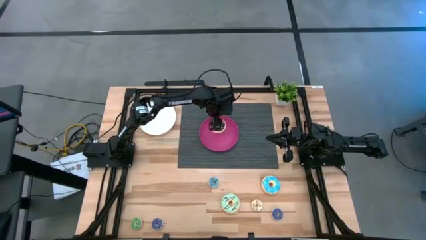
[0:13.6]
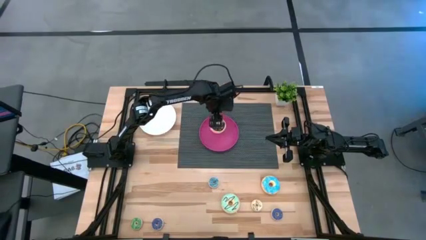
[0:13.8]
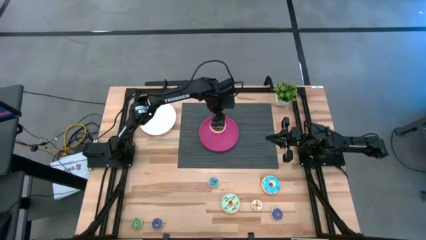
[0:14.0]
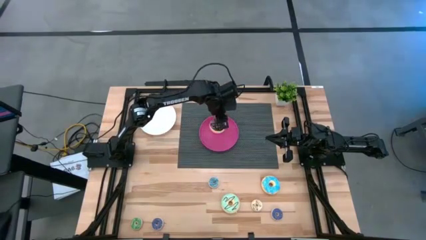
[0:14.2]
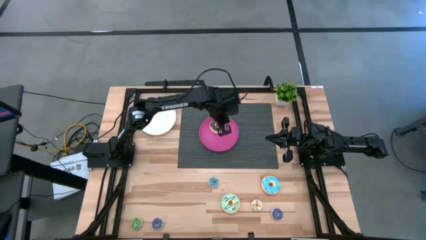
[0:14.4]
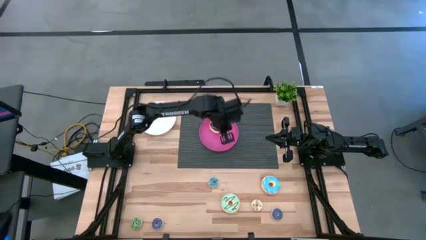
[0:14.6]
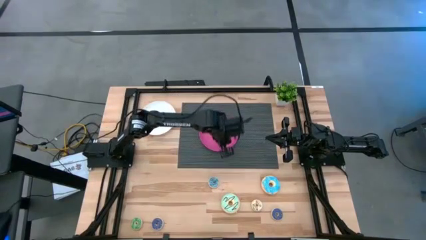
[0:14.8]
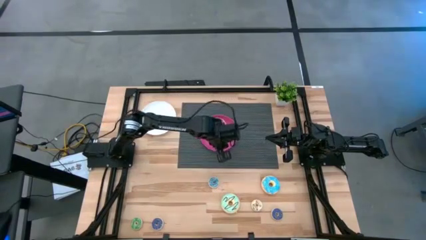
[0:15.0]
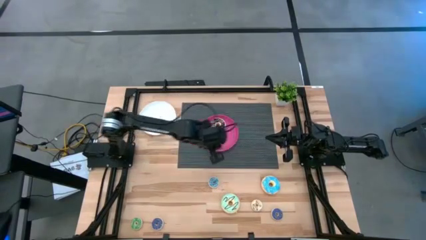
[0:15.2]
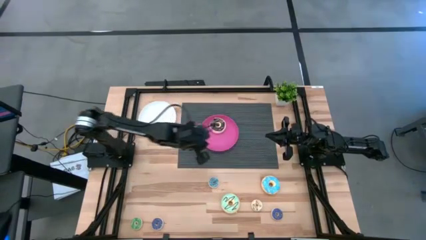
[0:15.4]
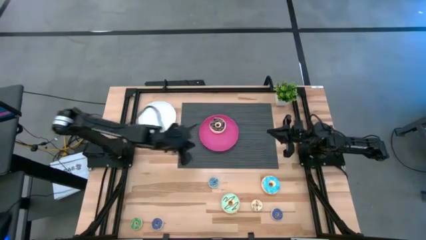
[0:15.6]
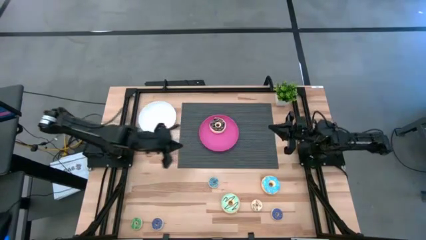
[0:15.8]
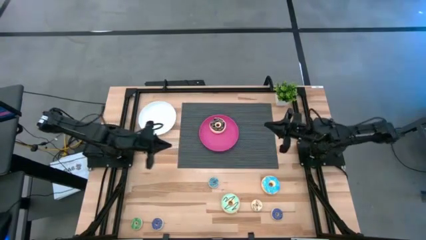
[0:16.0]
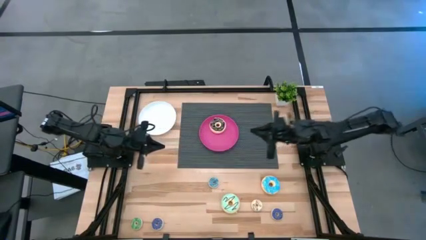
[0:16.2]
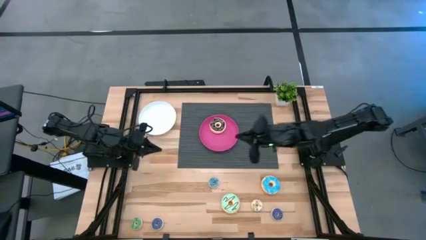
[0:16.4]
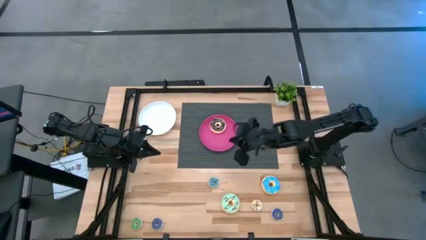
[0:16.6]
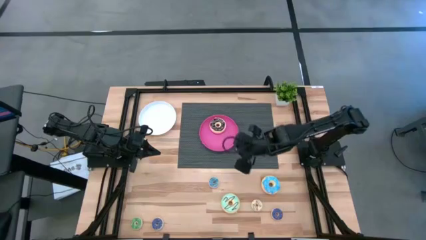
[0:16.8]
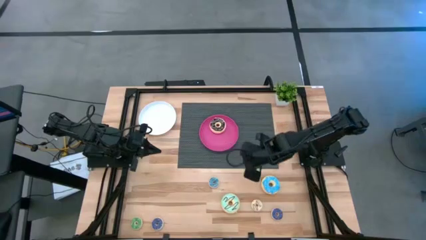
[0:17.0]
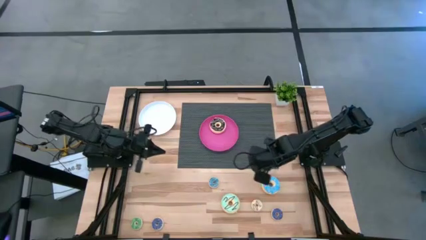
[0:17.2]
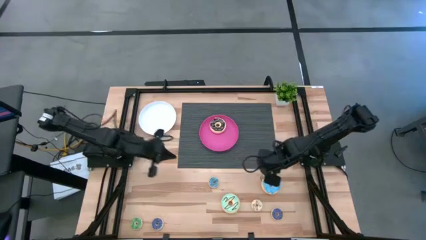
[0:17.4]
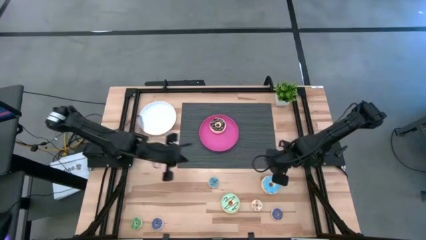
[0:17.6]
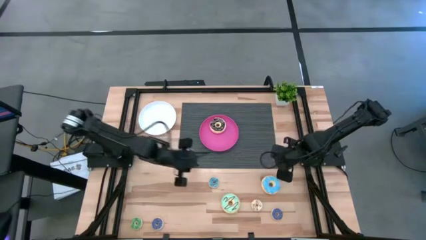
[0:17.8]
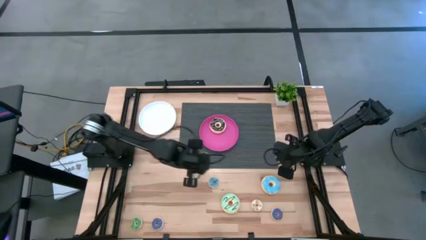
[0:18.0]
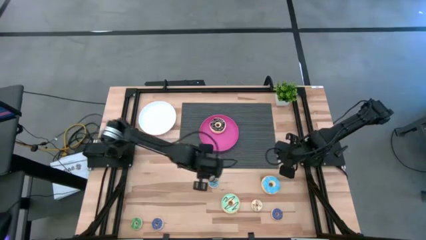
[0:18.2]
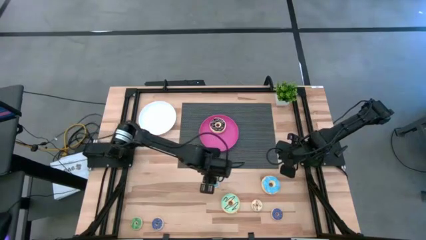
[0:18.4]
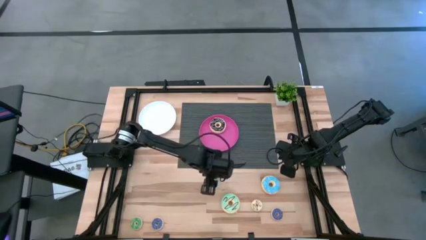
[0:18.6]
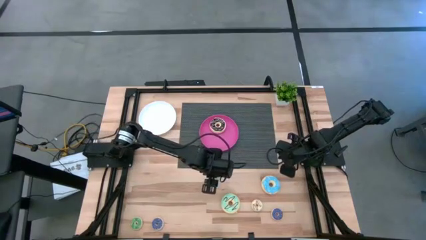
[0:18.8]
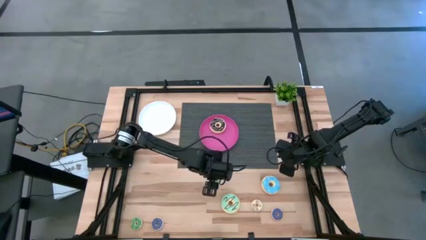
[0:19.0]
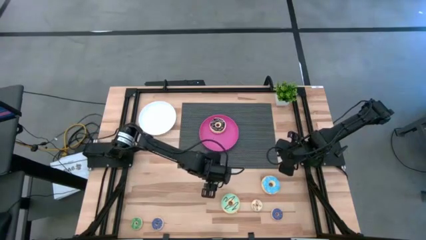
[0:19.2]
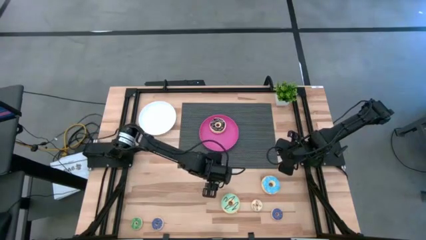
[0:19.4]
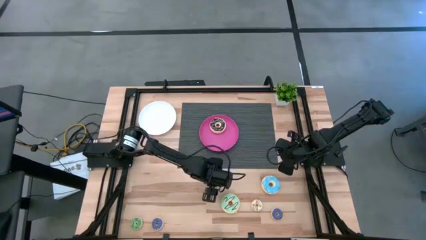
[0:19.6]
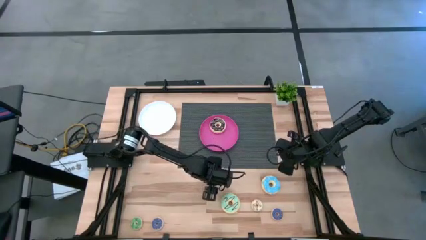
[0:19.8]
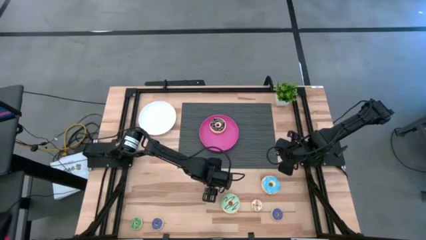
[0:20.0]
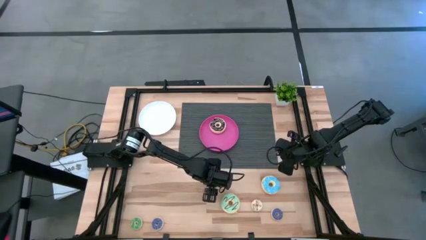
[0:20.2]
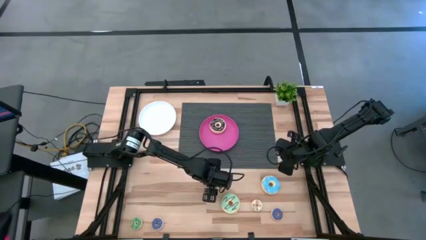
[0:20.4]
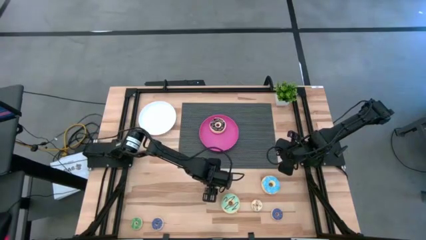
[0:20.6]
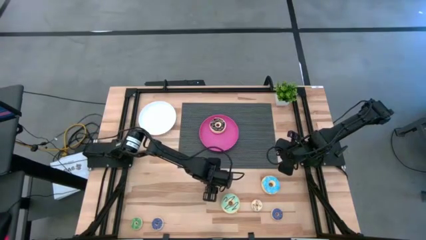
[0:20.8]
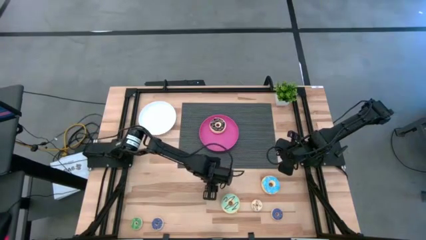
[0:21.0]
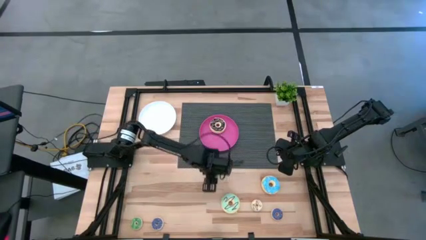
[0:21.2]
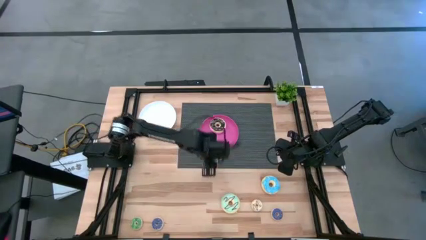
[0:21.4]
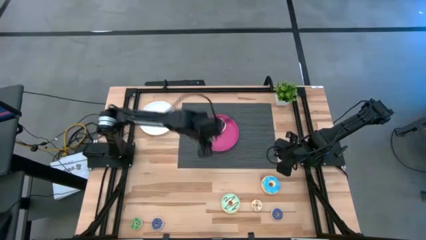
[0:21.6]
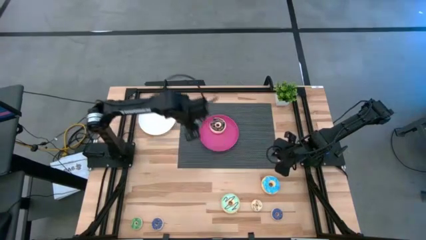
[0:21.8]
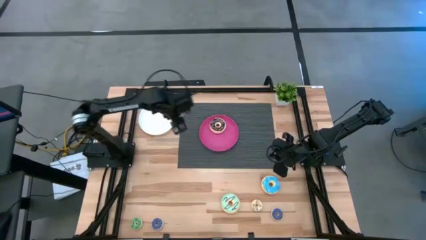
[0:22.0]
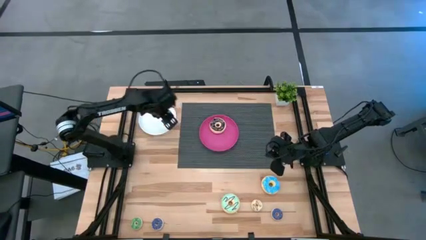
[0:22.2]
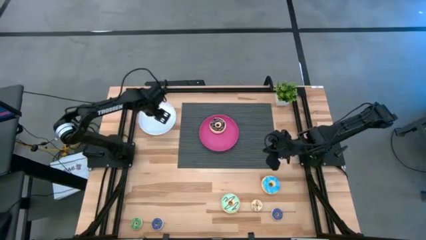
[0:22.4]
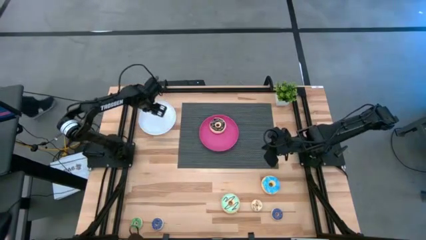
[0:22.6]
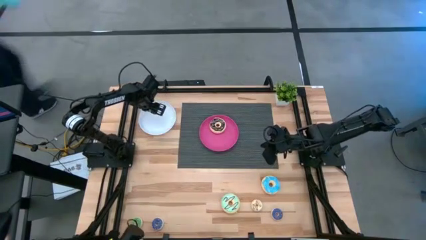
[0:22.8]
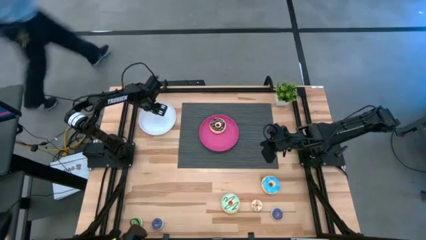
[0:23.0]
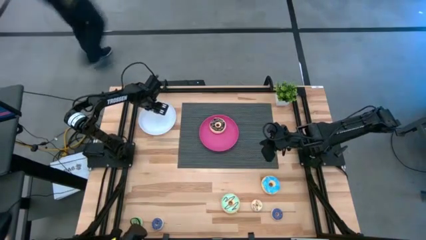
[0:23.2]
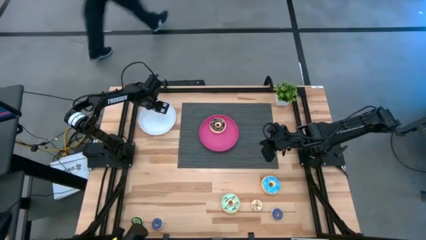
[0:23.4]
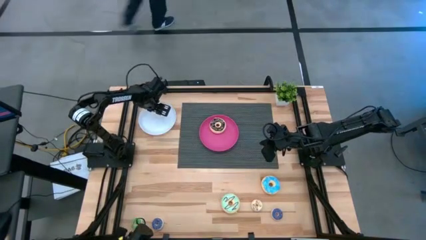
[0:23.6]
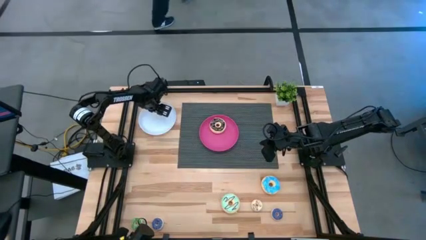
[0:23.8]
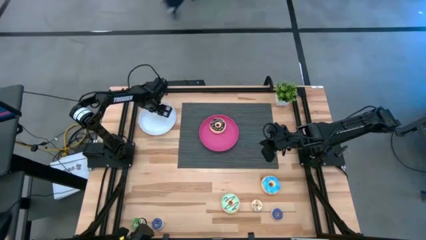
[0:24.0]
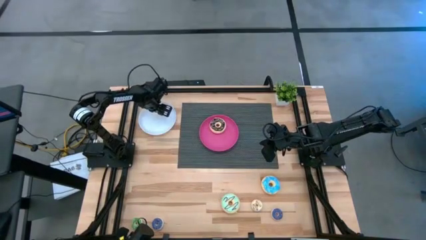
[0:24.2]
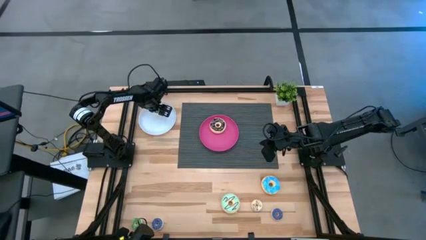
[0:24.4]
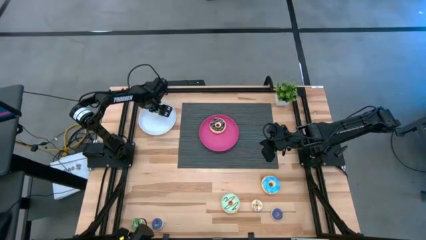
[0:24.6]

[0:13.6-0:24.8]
Task: Pick & Place donuts
Put the small blue donut on the white plate

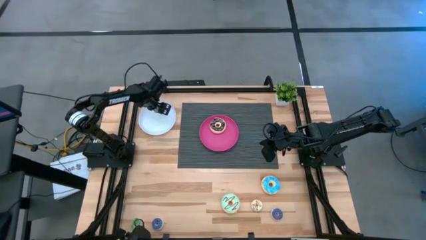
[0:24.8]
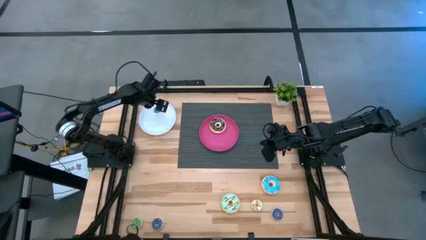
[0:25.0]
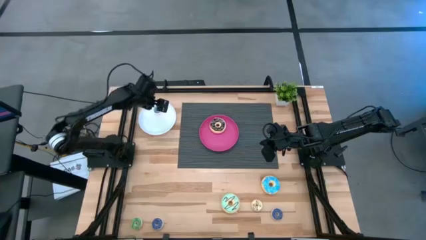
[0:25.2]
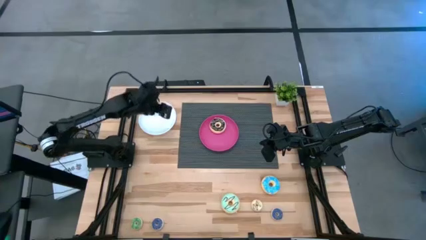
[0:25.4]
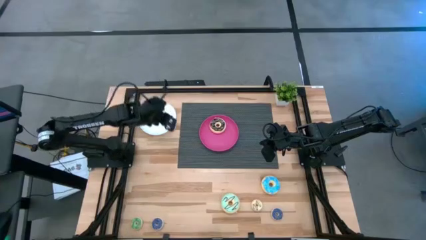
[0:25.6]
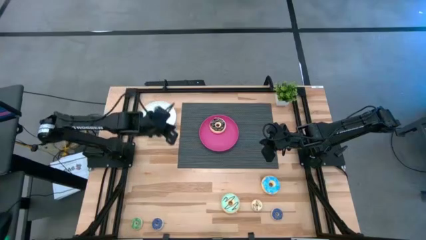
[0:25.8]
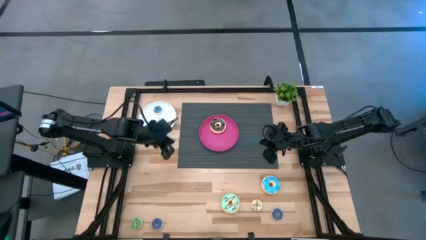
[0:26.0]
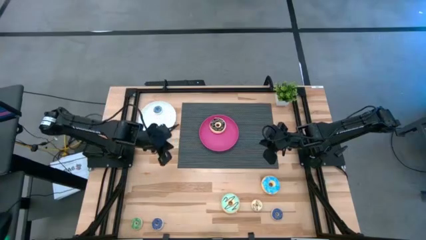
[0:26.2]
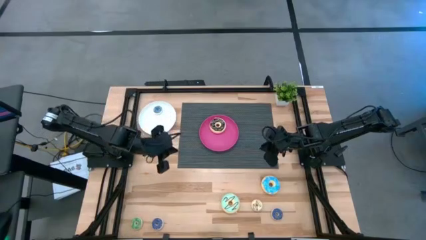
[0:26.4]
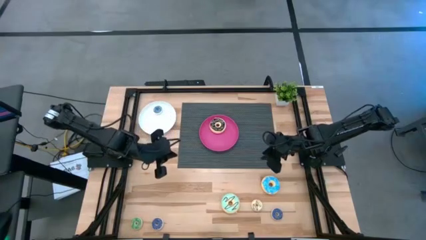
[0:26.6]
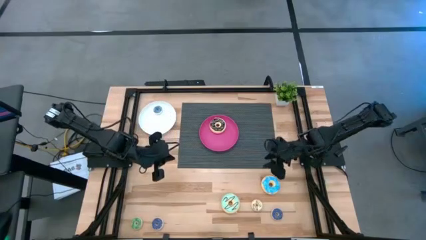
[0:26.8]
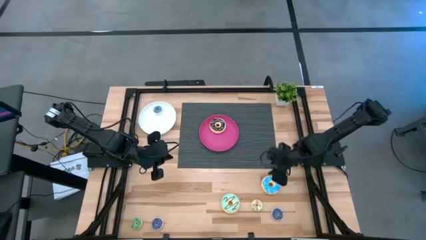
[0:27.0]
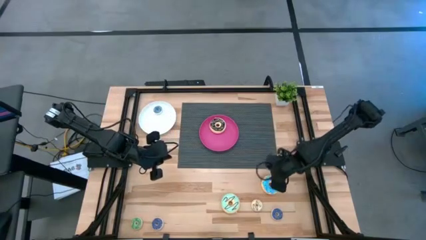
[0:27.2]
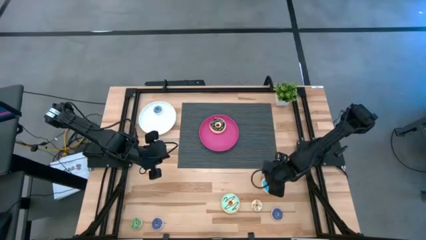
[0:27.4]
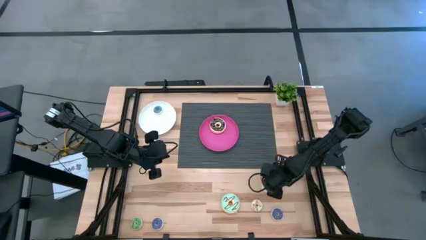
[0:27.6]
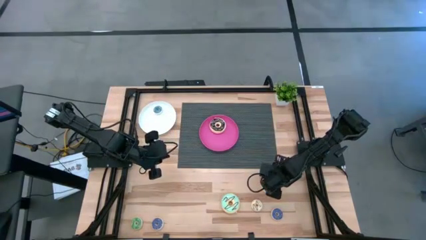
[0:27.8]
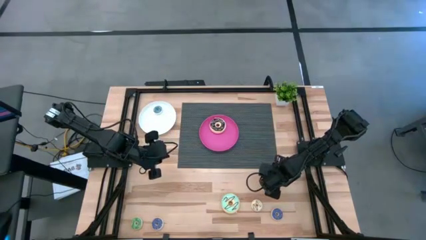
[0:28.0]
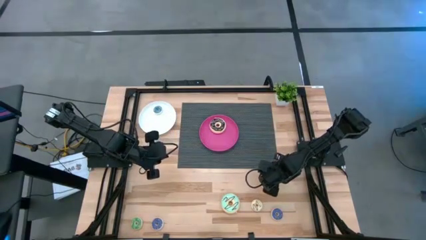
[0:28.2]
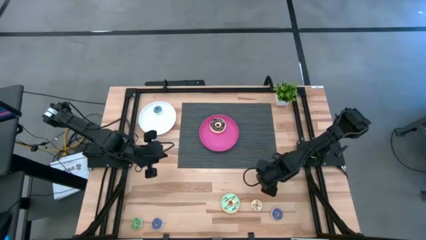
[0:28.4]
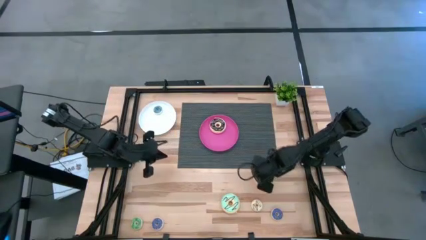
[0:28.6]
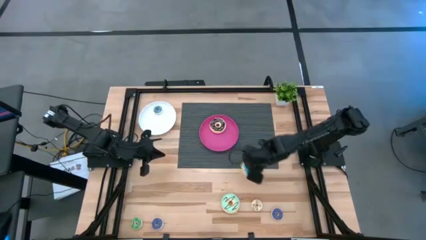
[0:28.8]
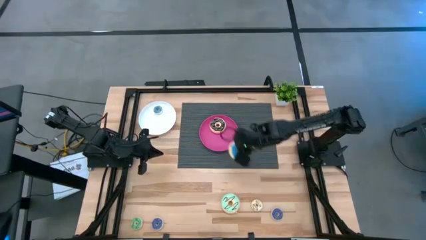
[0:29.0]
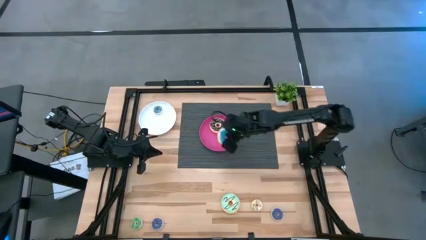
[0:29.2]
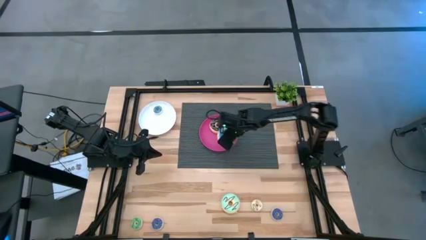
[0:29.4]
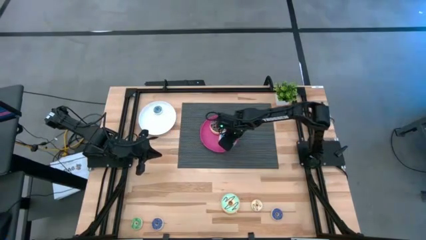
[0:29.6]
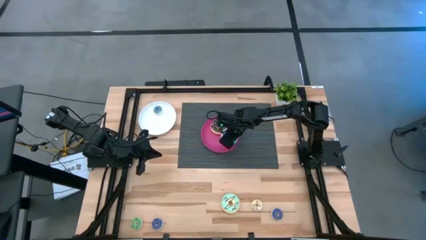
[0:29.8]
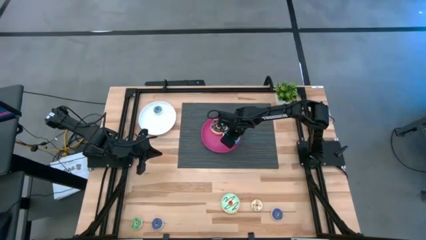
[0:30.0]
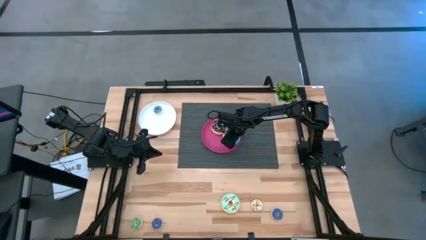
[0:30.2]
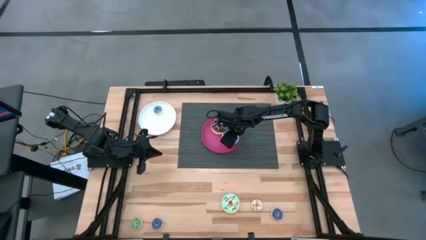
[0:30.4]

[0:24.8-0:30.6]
Put the big blue donut on the pink plate
